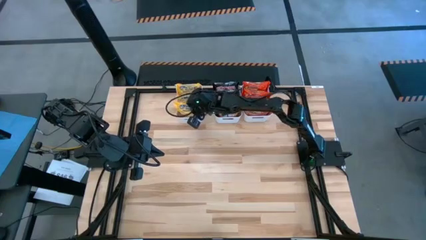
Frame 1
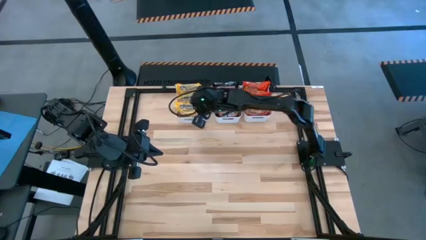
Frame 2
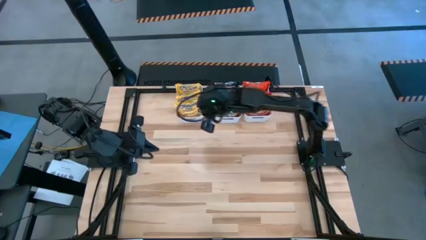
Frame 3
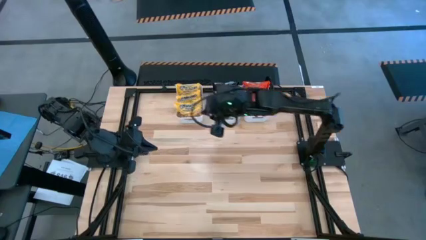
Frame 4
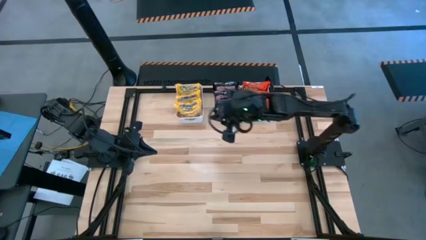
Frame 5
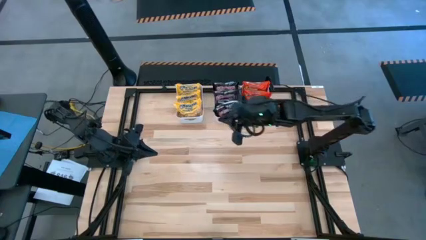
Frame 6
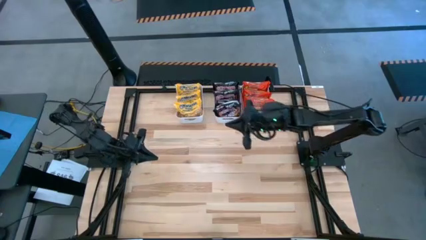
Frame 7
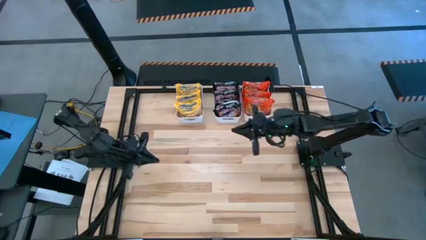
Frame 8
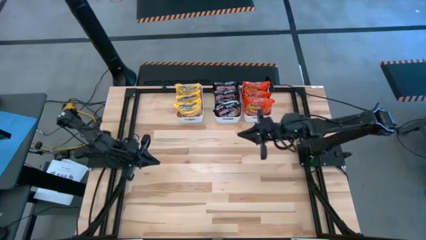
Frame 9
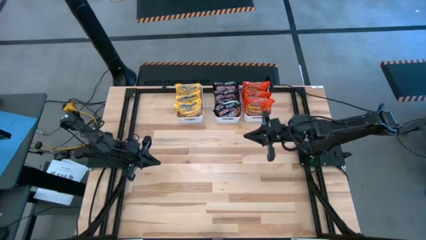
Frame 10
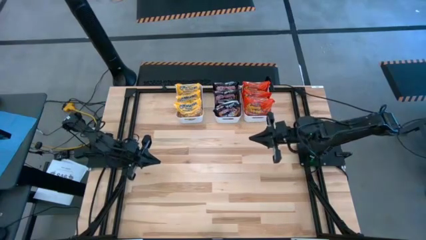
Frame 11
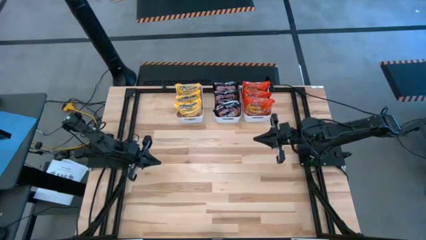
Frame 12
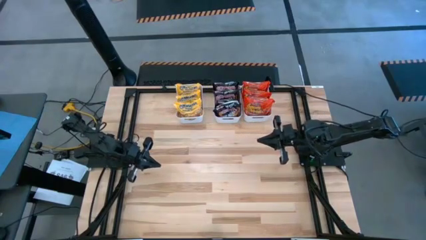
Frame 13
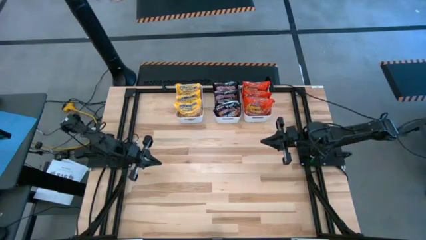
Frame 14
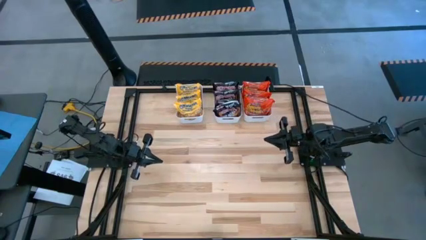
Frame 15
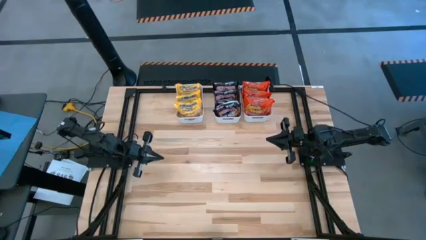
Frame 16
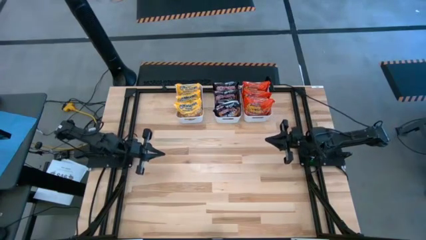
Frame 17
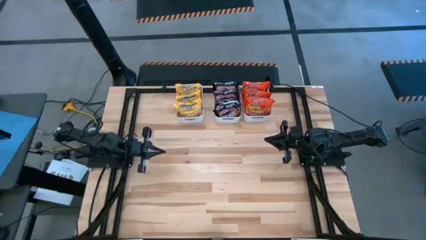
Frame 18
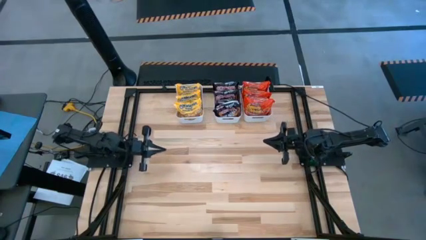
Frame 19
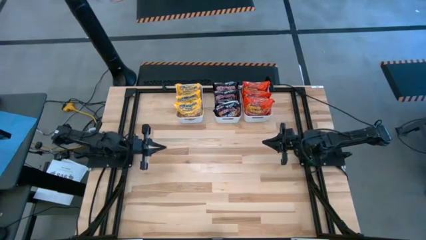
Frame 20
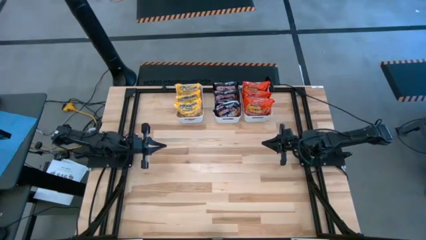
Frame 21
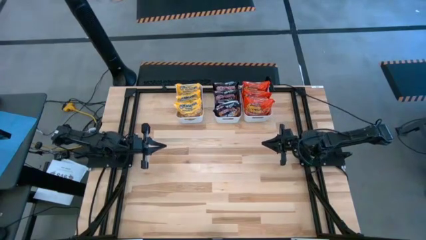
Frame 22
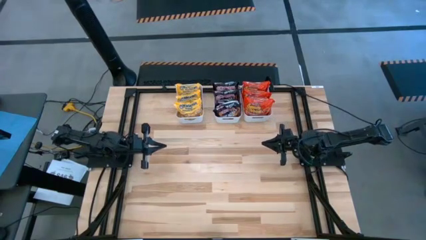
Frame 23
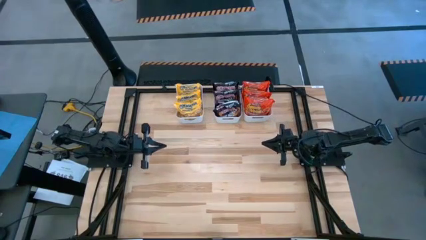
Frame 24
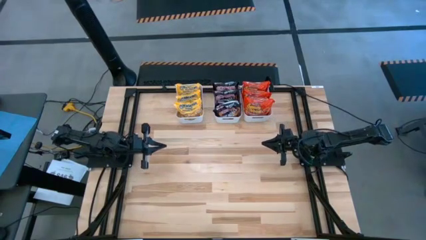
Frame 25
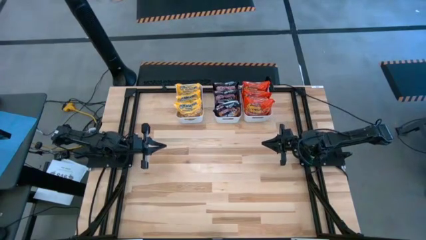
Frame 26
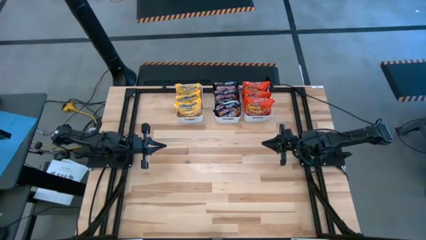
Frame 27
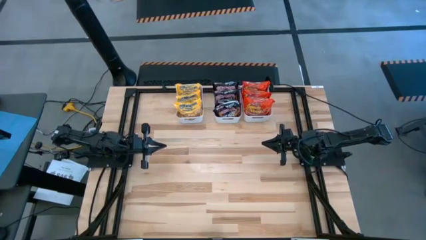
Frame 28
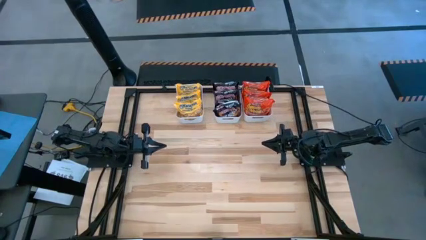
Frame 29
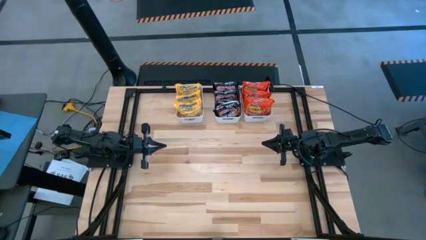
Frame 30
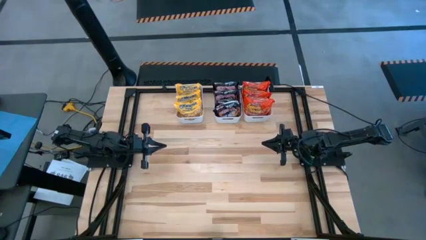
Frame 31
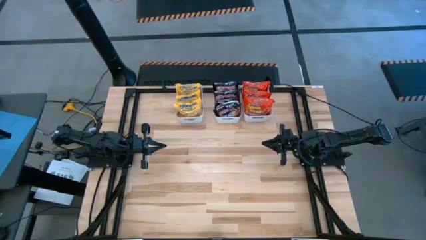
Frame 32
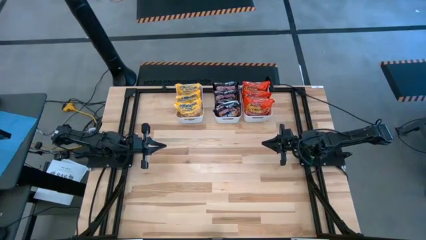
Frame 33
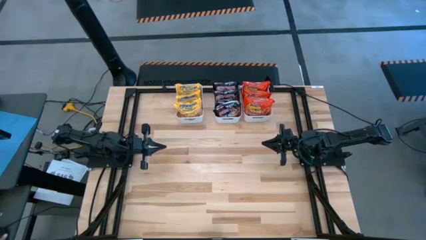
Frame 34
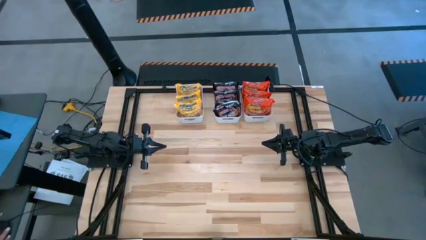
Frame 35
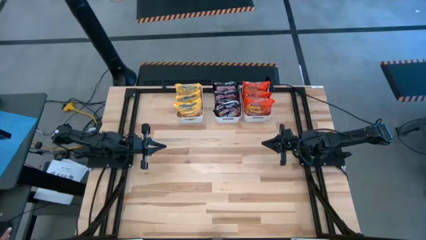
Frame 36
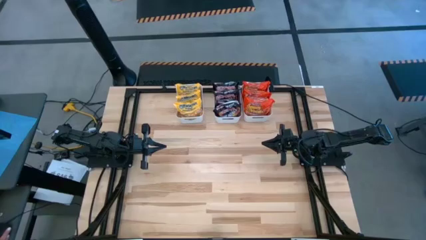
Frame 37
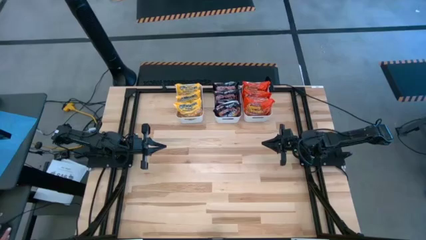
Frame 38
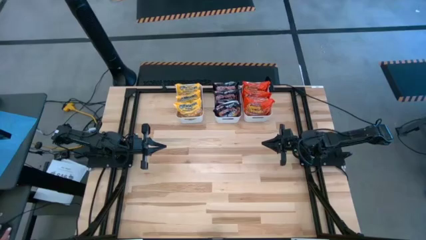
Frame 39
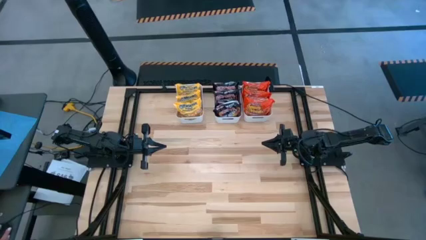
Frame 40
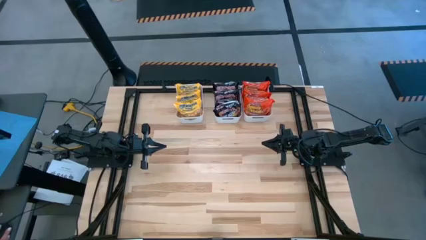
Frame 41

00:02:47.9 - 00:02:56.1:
Task: Sort Maruchan noodles
Return to Home Position

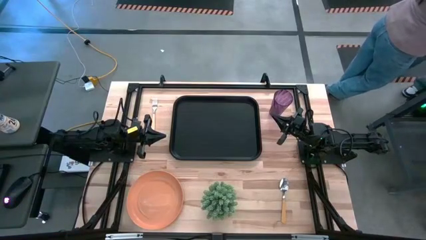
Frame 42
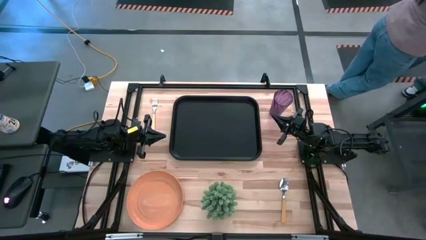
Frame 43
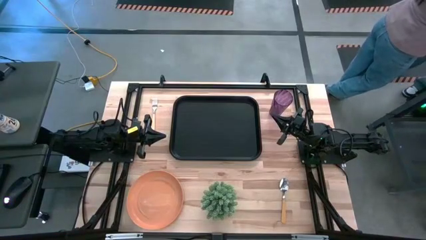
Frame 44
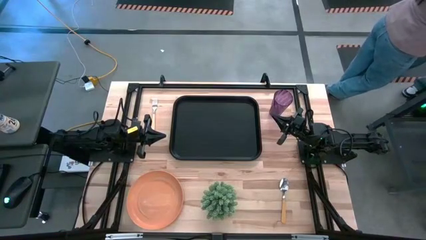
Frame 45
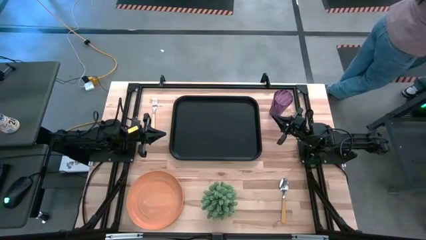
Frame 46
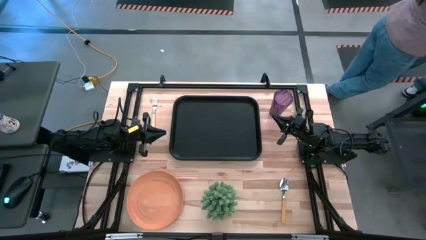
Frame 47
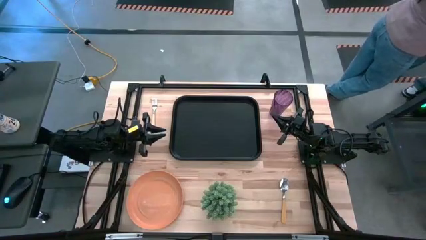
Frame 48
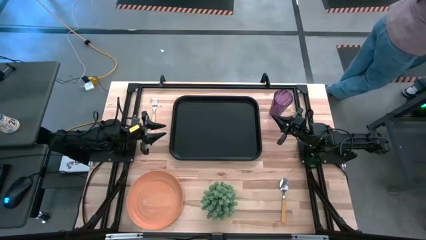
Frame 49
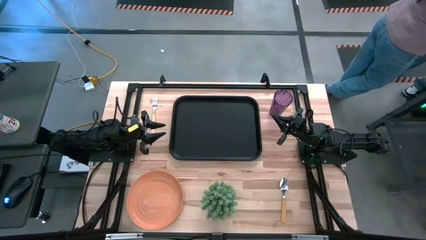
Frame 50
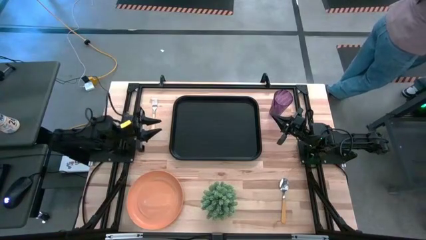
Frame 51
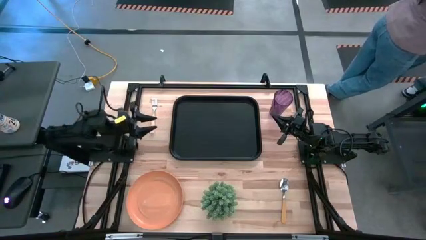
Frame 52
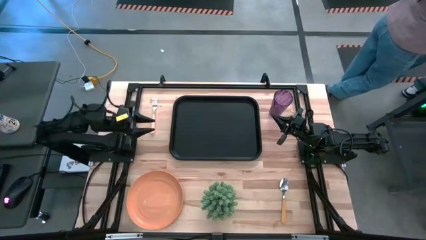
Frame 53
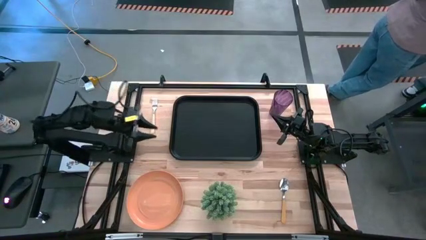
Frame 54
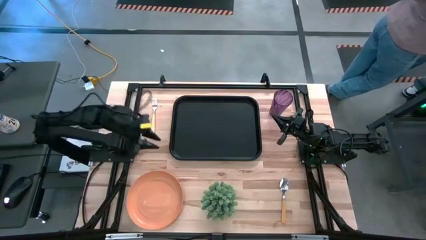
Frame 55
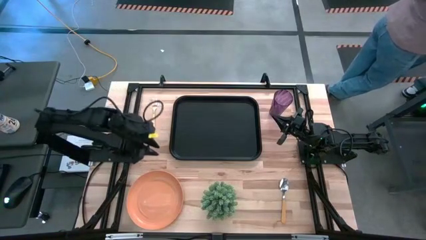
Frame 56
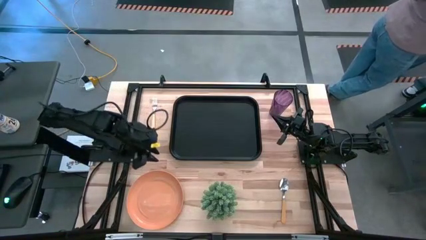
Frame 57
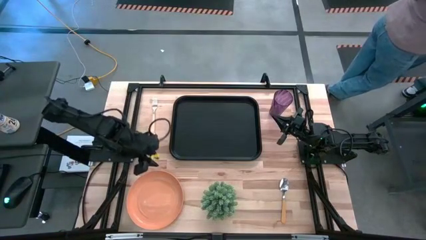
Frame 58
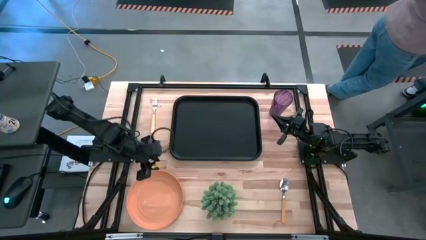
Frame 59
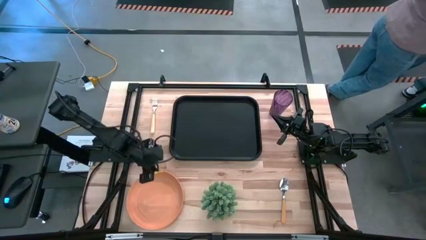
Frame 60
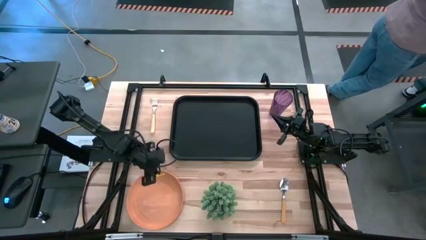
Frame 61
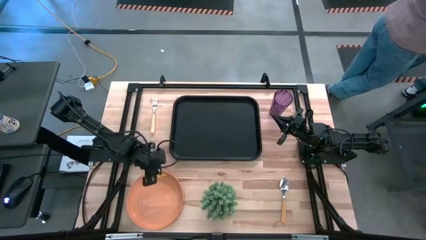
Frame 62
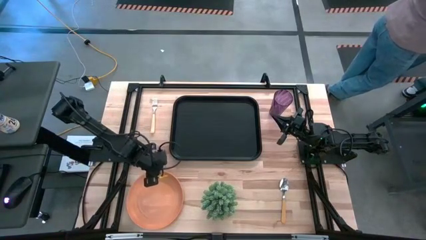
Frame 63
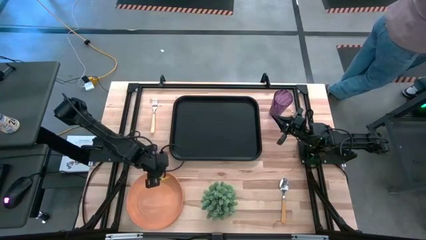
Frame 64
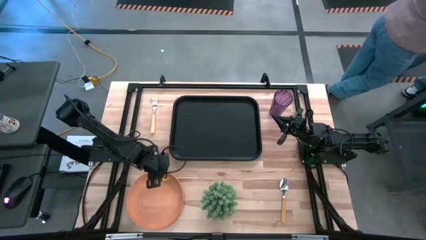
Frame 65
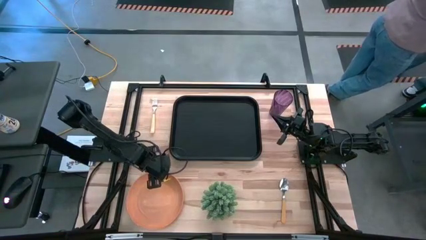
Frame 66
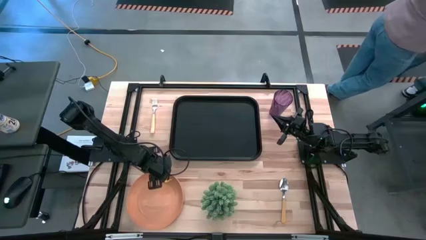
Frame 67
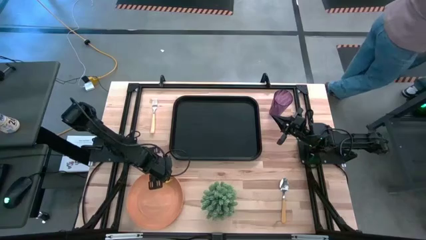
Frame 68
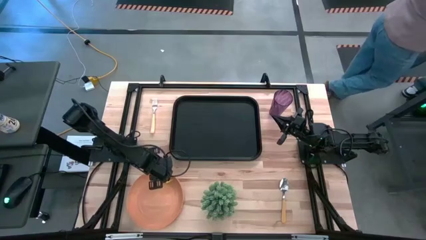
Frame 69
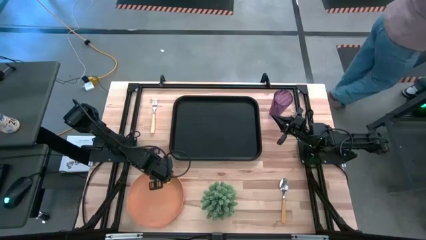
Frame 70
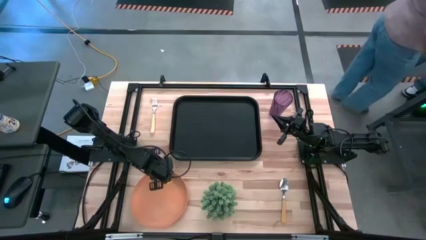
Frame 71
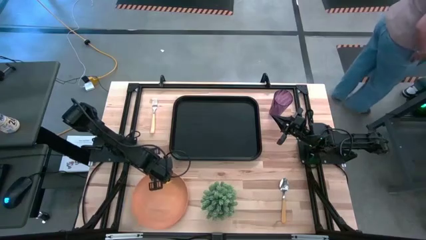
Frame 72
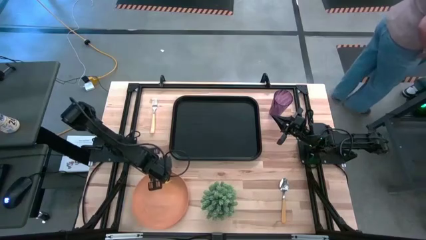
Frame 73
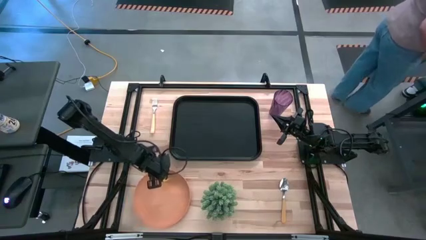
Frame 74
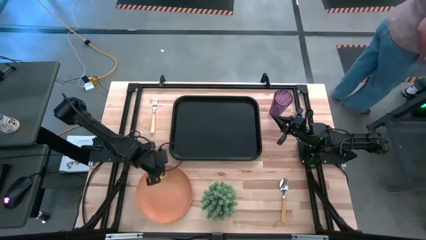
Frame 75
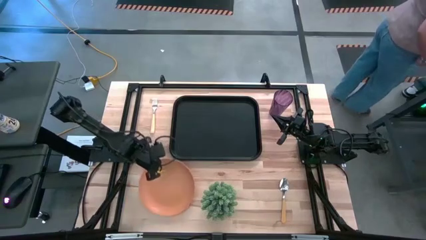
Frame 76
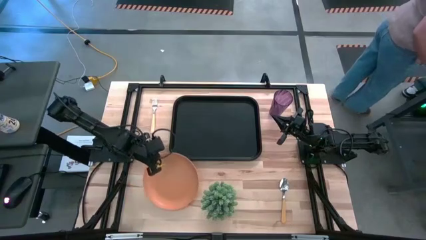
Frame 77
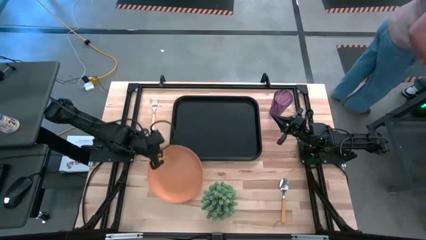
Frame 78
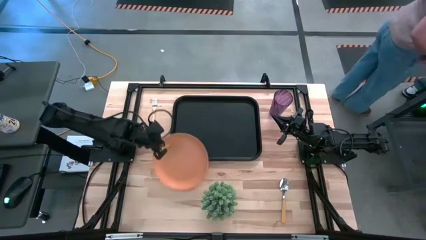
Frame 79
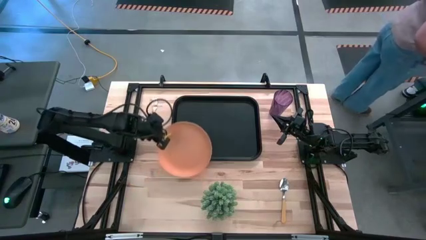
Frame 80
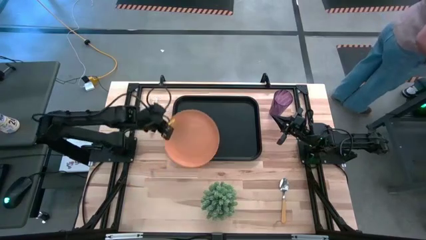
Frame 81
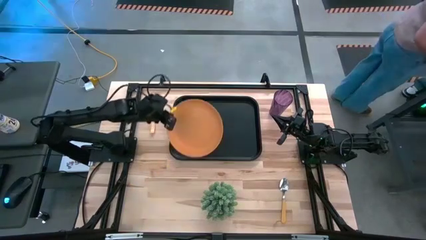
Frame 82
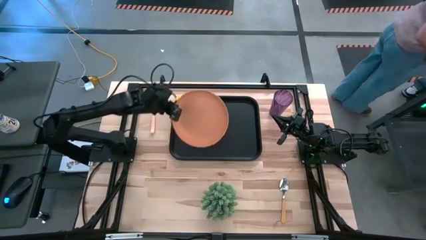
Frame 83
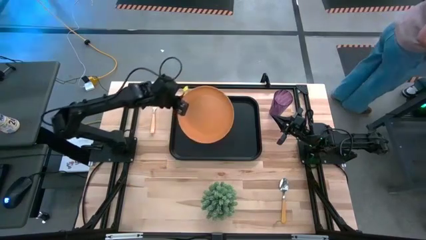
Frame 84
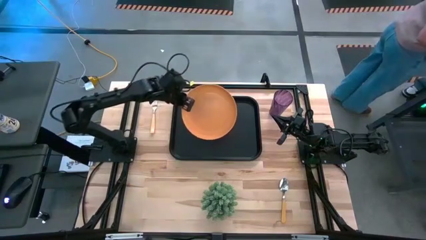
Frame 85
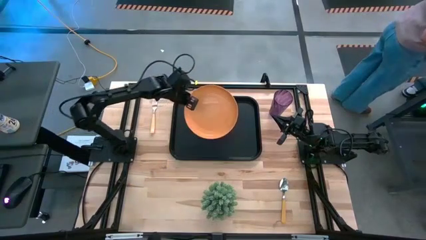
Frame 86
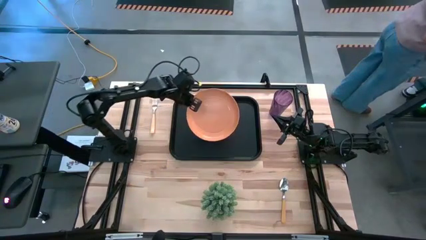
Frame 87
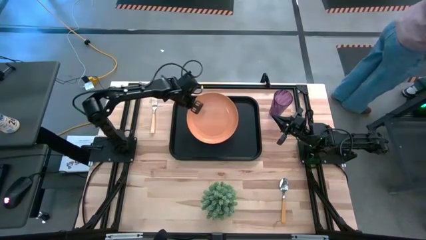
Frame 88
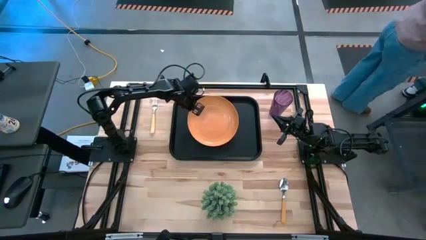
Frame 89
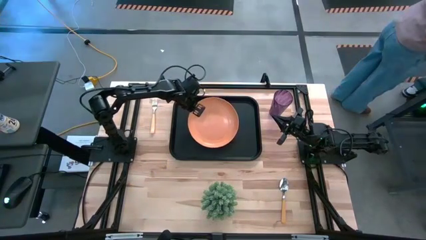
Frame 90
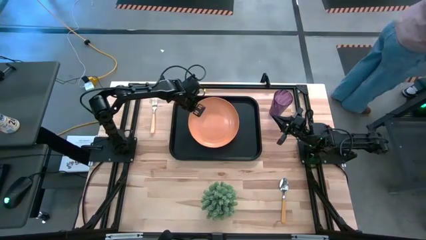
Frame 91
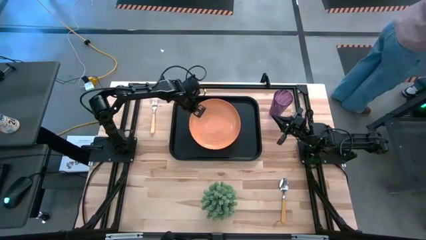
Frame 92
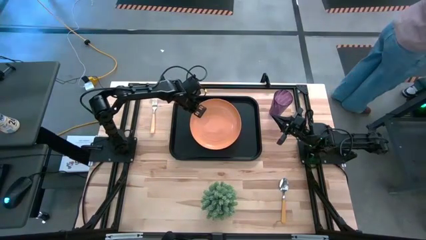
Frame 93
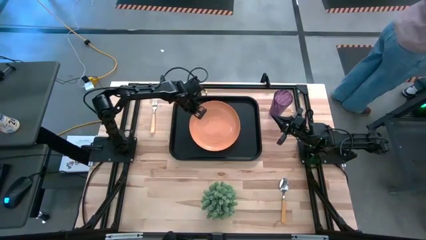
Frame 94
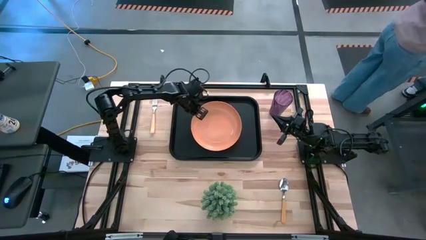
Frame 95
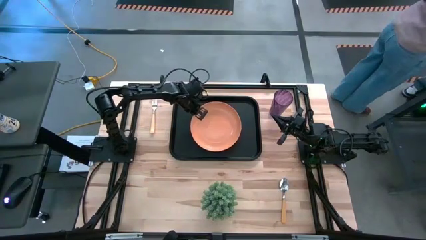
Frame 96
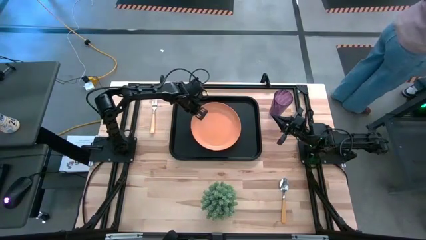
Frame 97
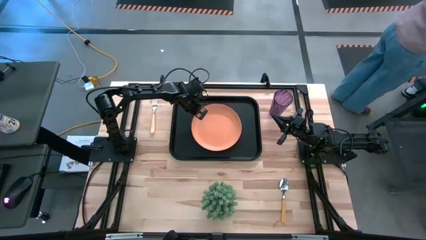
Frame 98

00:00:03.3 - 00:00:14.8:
Task: Pick and place plate/cup/fork/spoon on tray
Put the orange plate on the black tray
